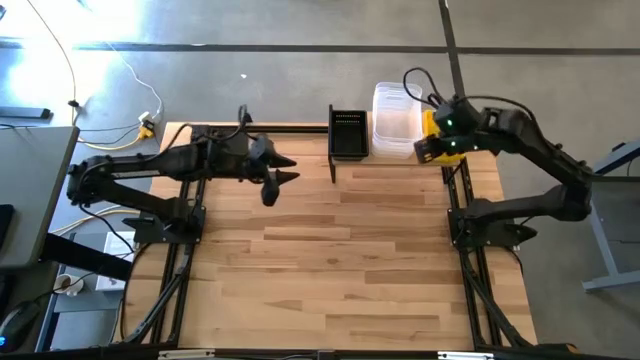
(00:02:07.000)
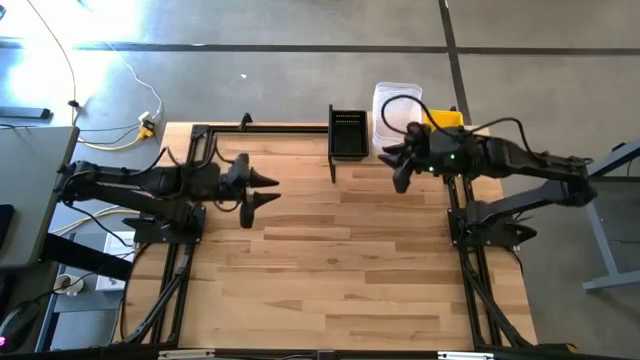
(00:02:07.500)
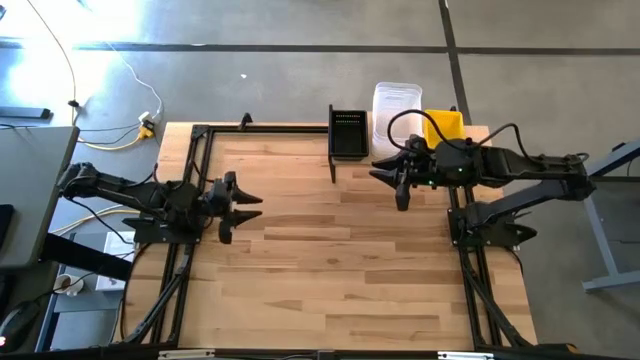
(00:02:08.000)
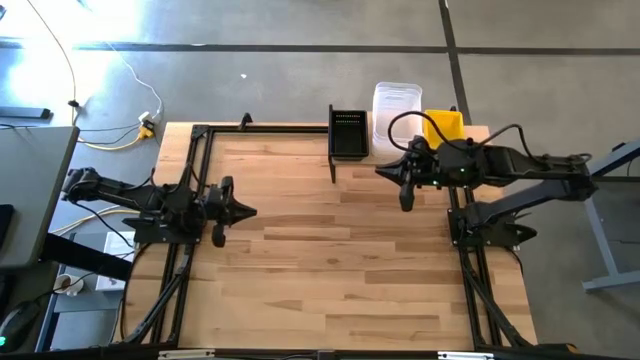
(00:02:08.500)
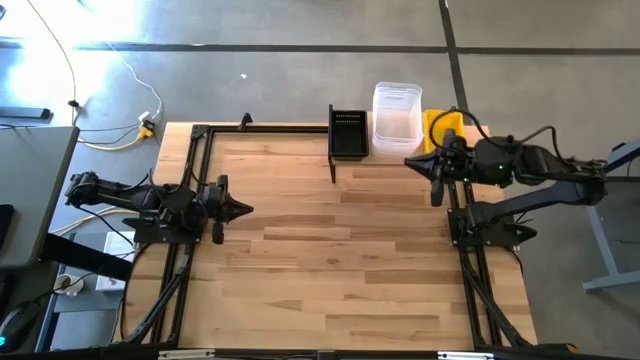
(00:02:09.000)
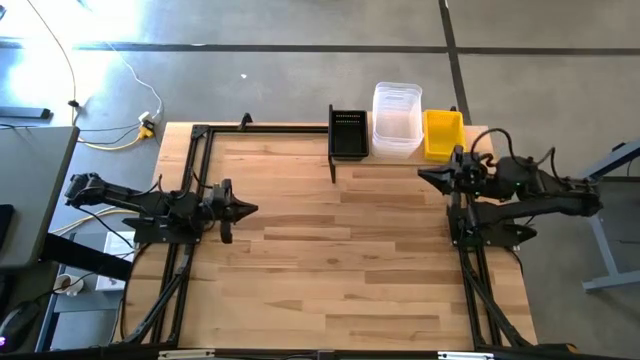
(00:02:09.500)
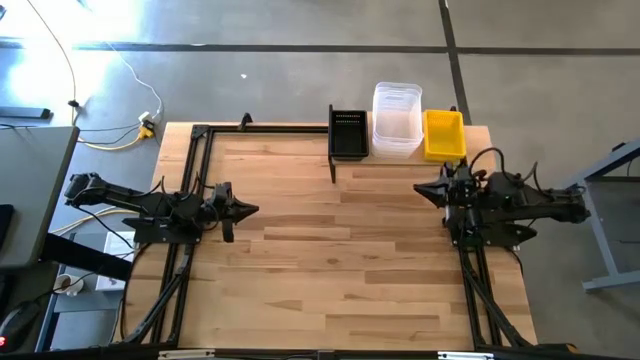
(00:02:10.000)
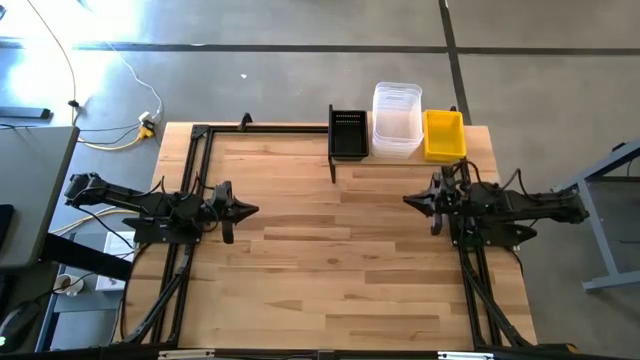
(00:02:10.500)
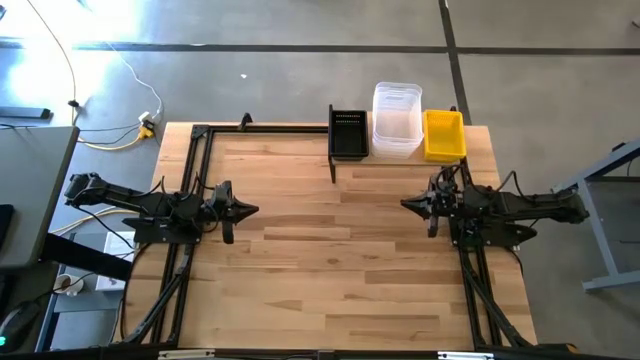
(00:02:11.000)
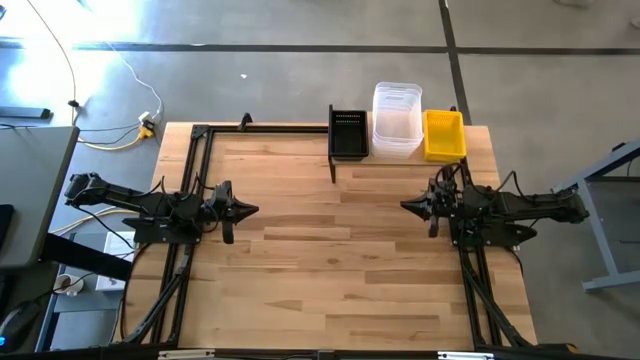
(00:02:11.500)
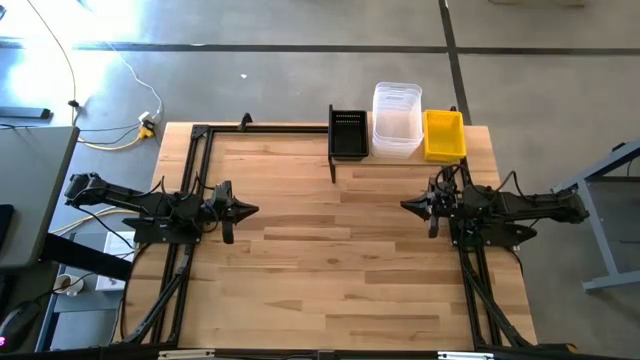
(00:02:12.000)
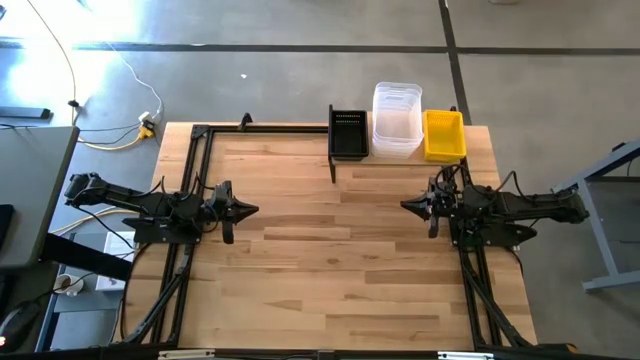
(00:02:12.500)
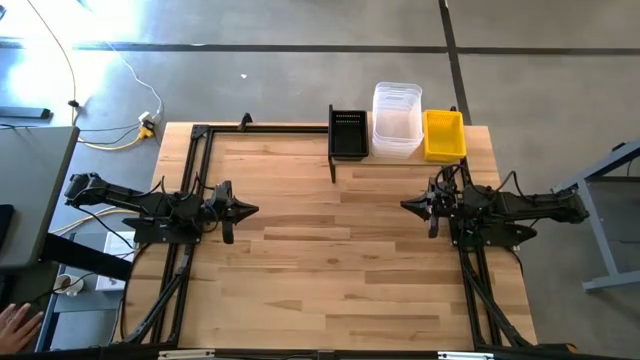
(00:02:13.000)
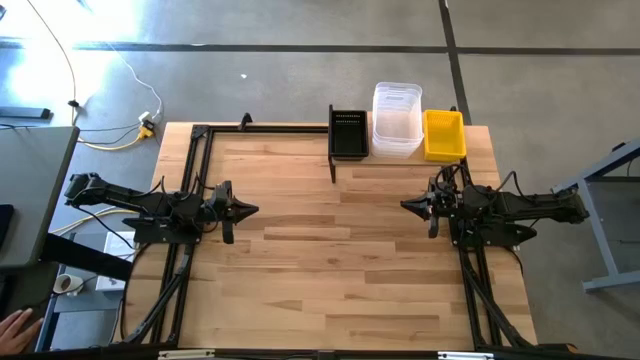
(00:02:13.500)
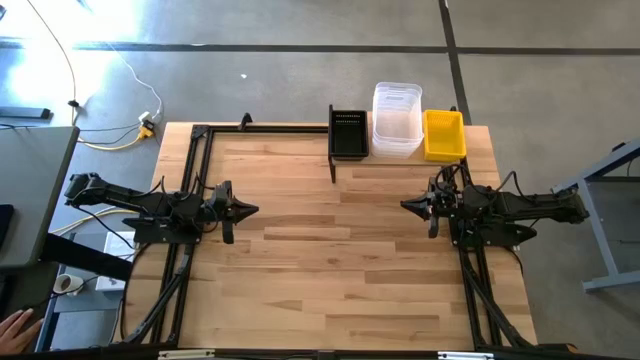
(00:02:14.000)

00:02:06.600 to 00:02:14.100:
Task: Stack baskets on shelf by color
Return to Home Position

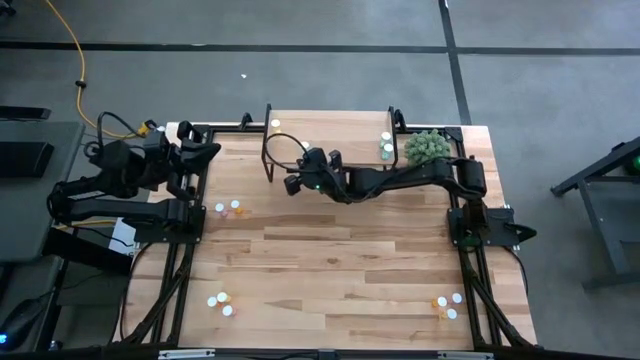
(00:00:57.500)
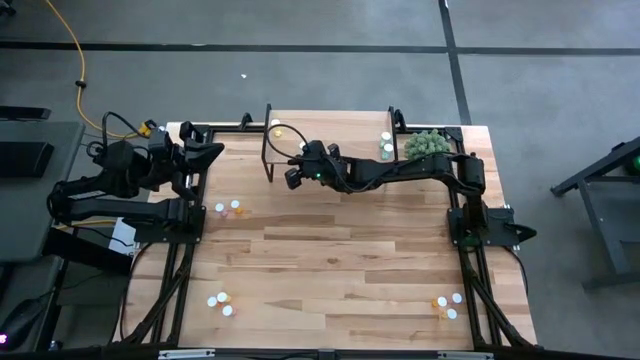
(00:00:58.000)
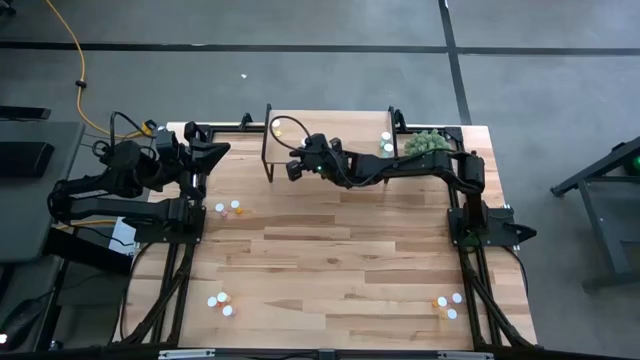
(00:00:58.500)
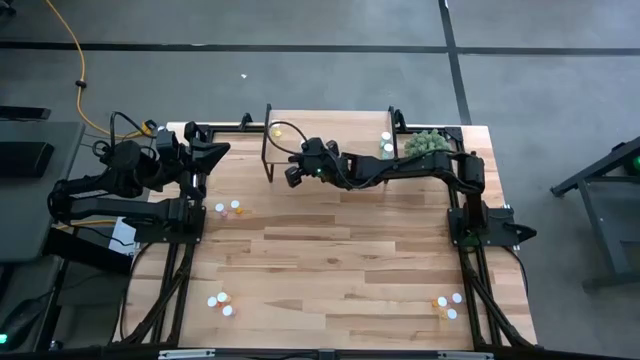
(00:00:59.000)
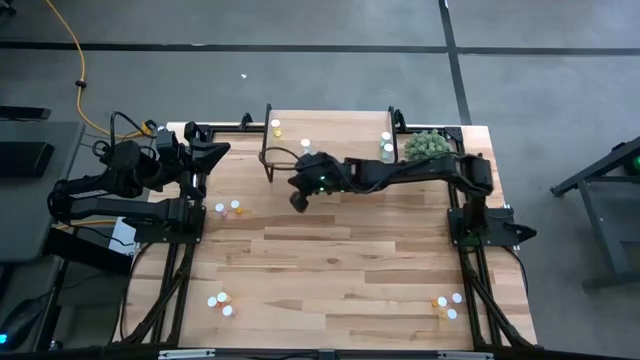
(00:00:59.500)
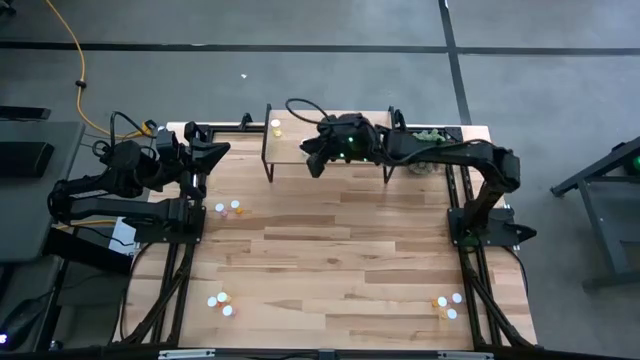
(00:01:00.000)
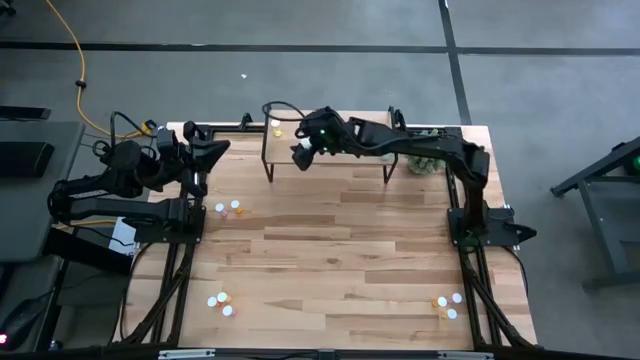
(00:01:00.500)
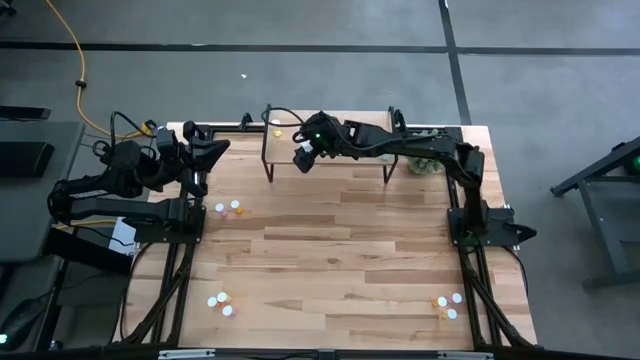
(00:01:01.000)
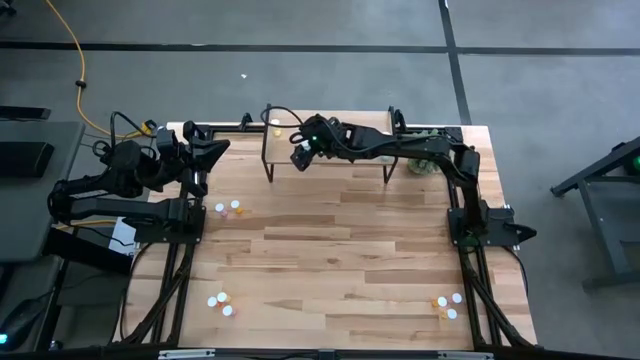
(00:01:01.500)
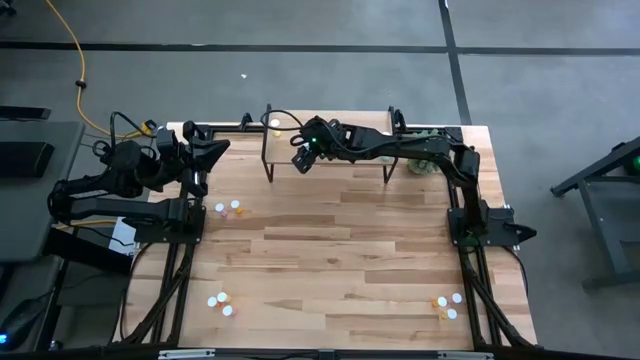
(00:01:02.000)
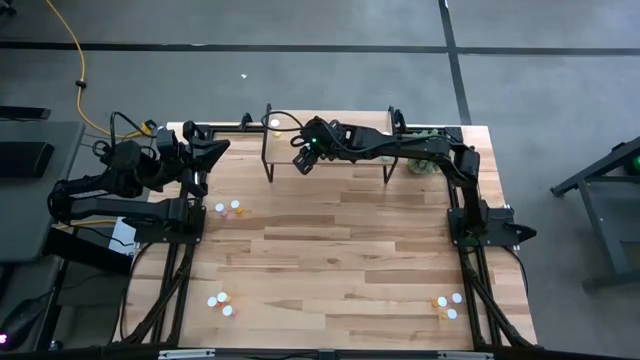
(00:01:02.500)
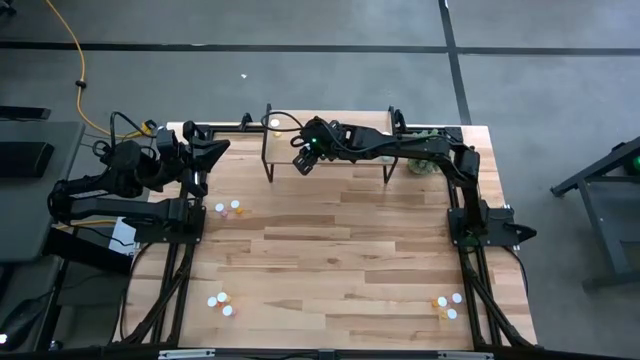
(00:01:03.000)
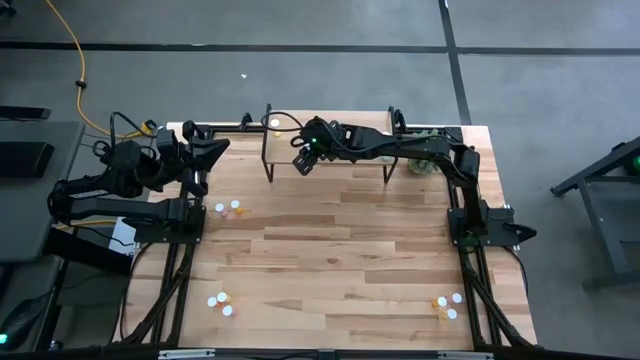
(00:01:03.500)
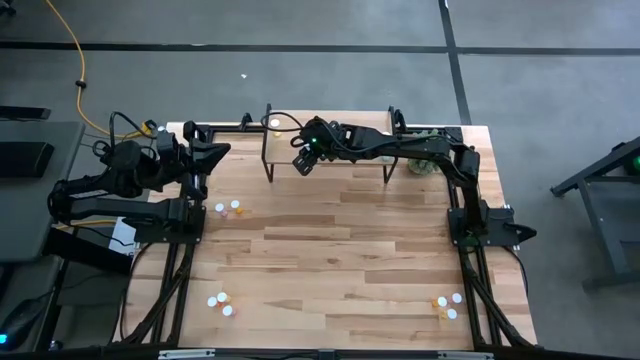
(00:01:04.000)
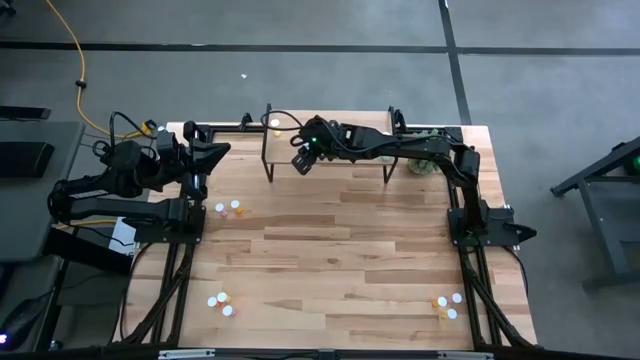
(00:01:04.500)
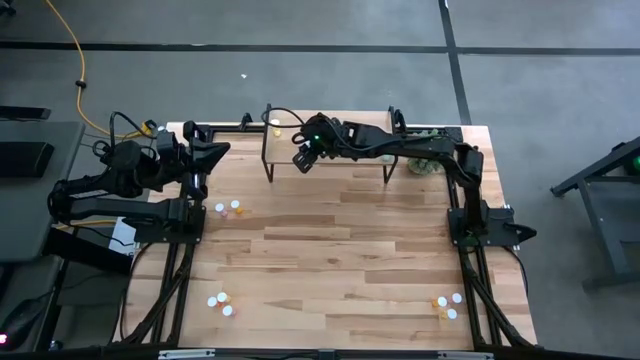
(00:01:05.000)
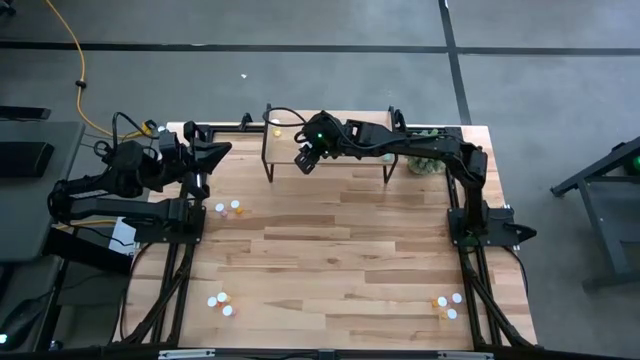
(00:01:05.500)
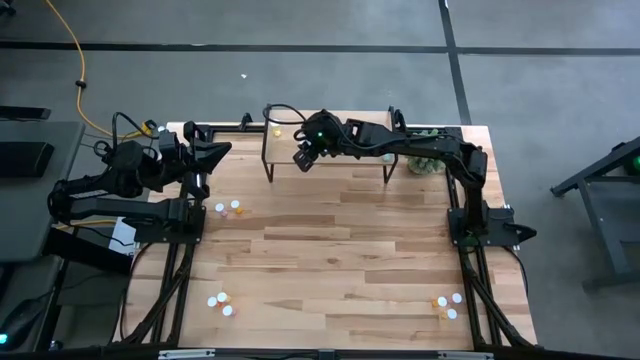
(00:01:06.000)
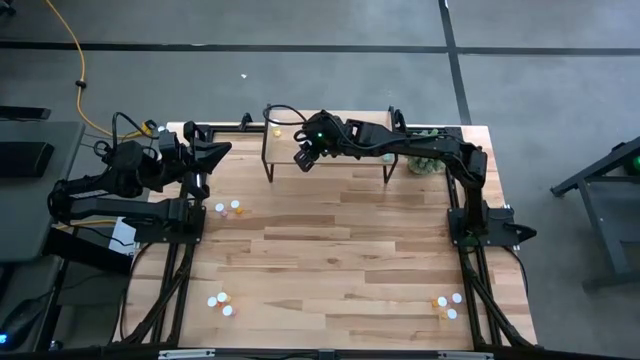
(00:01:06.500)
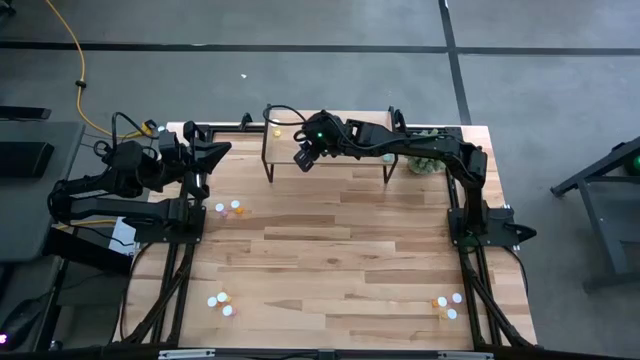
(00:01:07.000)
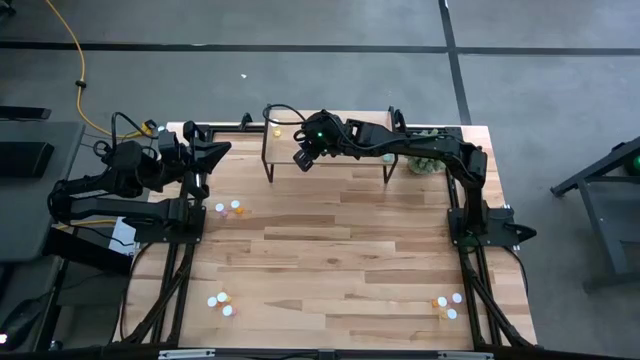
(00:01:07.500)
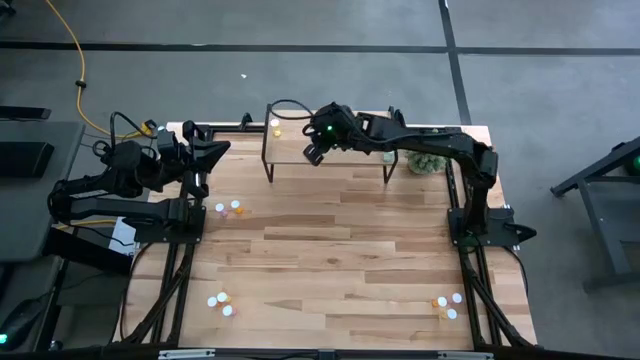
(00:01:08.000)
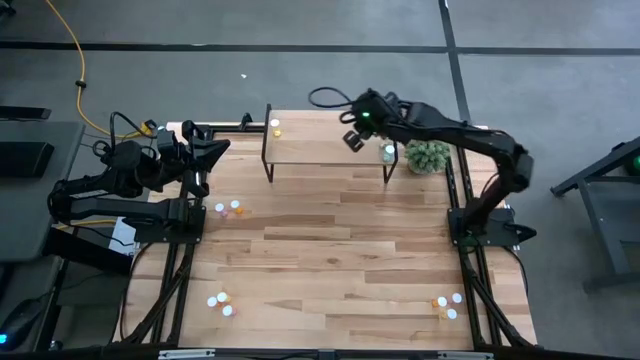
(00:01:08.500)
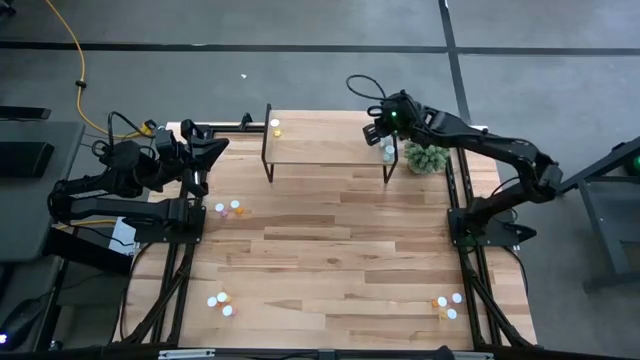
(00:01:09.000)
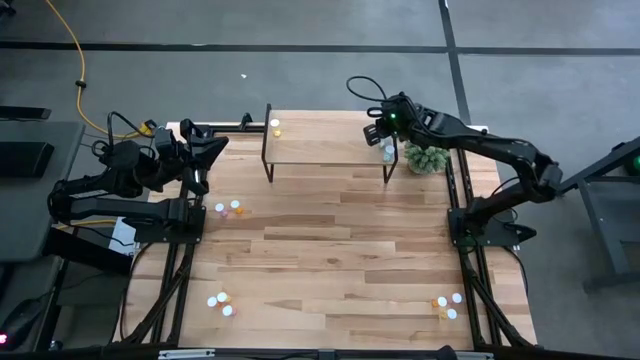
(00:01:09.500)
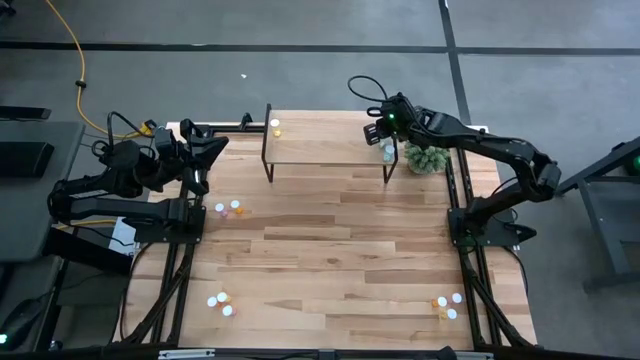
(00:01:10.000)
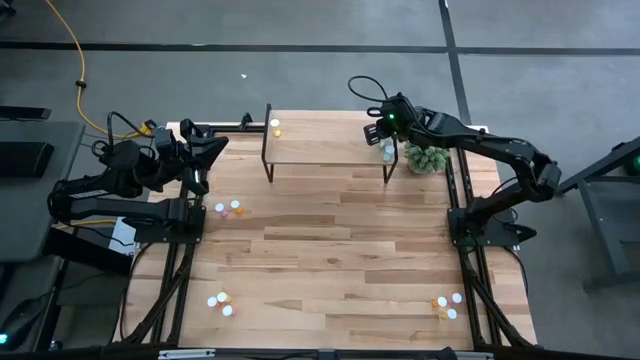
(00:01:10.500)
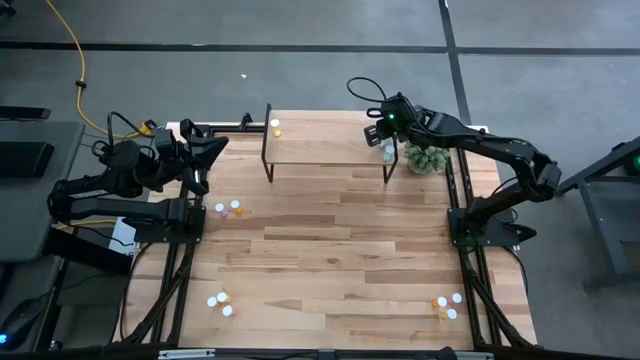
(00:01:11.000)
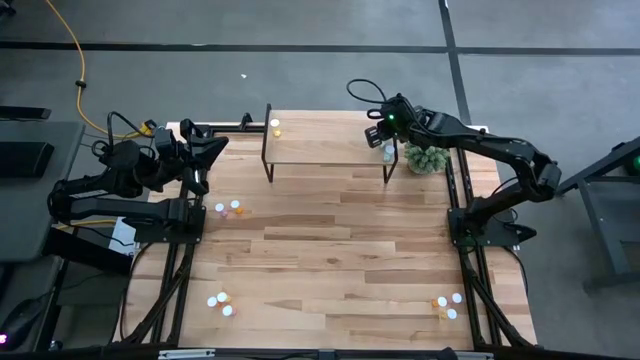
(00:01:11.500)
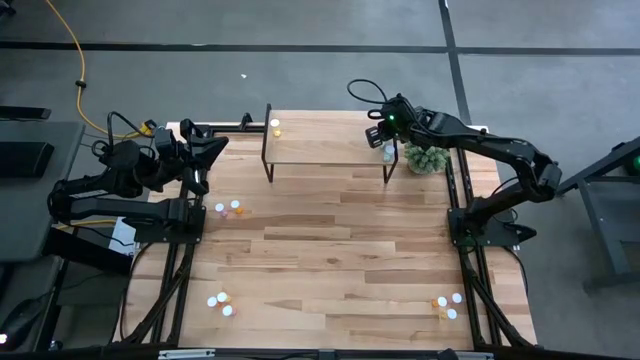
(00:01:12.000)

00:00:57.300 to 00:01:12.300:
Task: Pick and place medicine bottles onto shelf by color
Put the blue pill bottle aligned with the other blue pill bottles on the shelf
